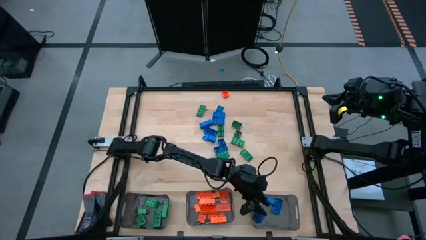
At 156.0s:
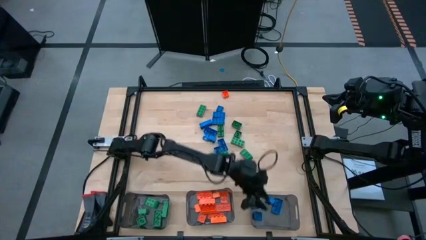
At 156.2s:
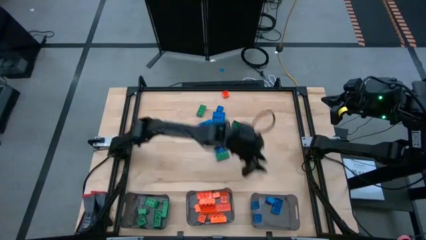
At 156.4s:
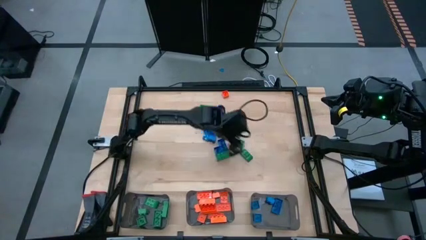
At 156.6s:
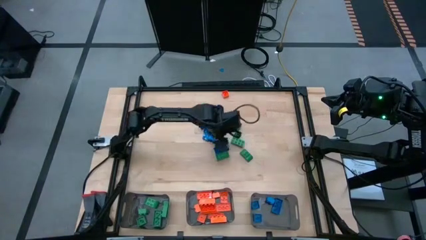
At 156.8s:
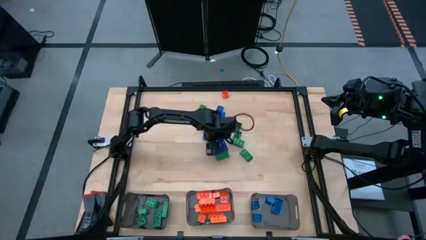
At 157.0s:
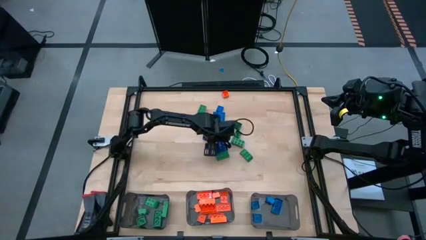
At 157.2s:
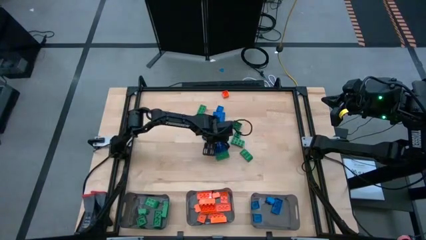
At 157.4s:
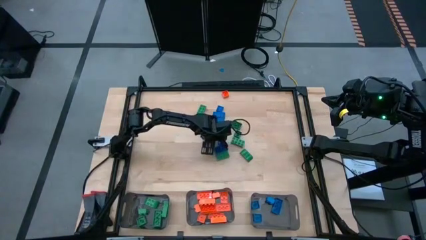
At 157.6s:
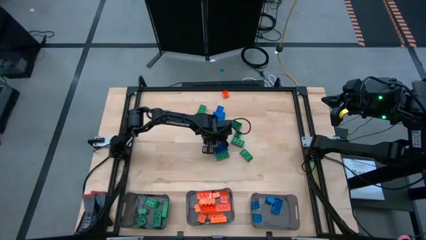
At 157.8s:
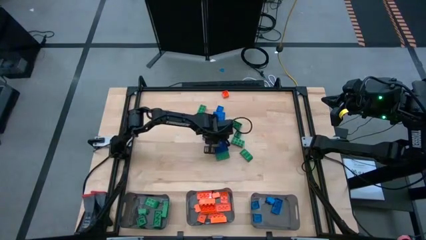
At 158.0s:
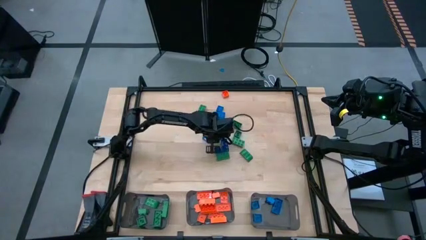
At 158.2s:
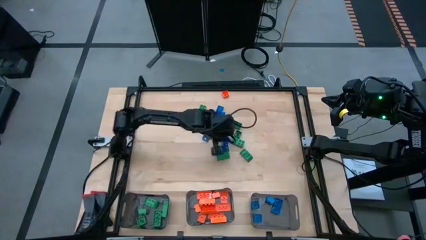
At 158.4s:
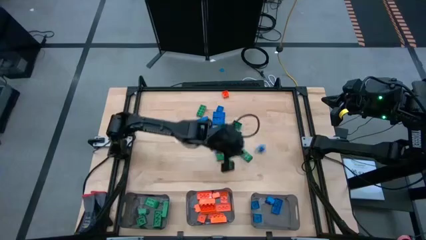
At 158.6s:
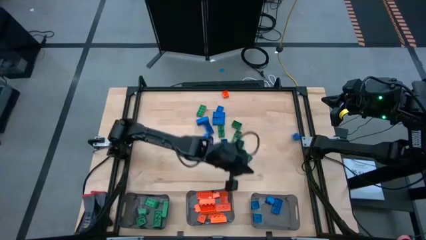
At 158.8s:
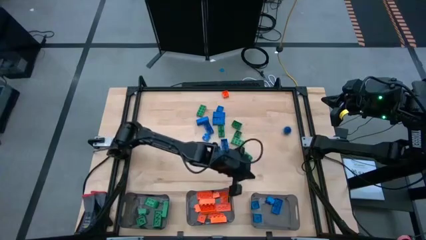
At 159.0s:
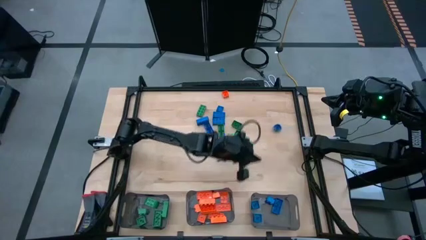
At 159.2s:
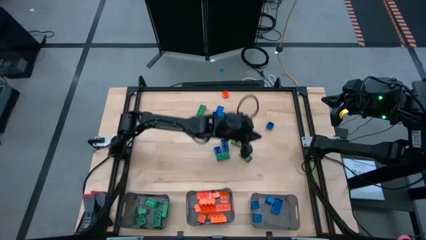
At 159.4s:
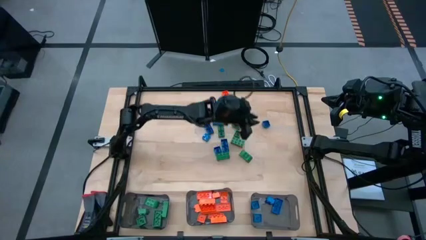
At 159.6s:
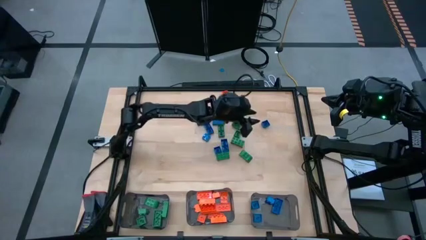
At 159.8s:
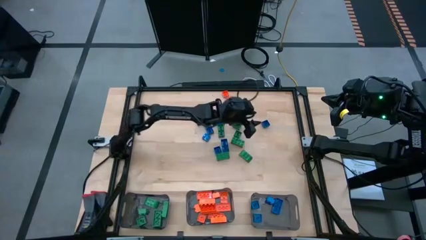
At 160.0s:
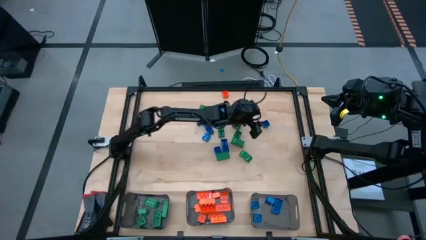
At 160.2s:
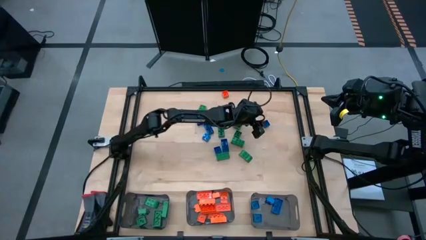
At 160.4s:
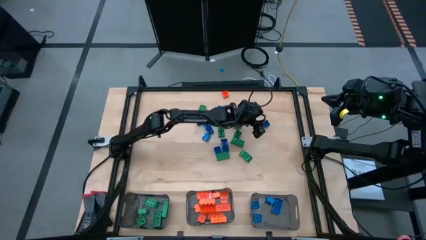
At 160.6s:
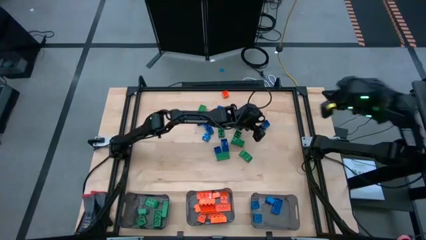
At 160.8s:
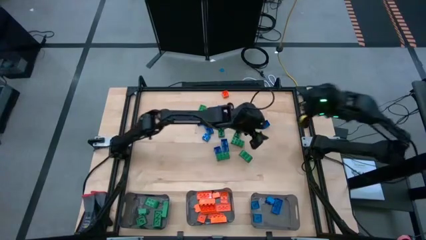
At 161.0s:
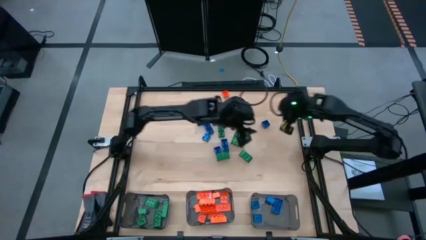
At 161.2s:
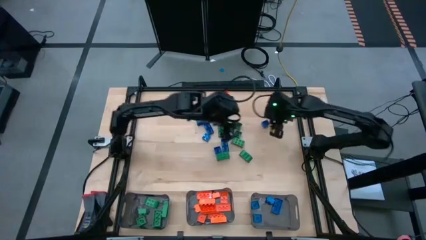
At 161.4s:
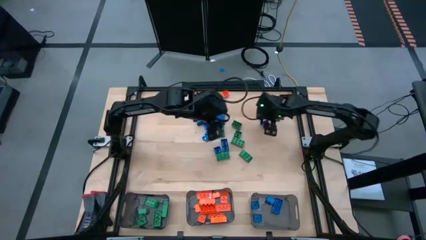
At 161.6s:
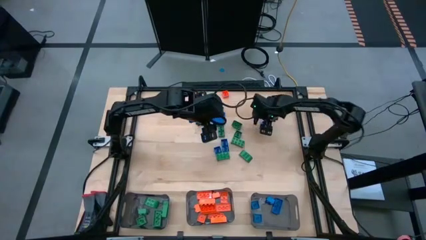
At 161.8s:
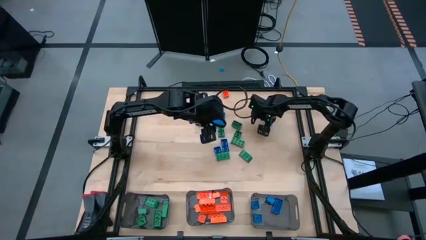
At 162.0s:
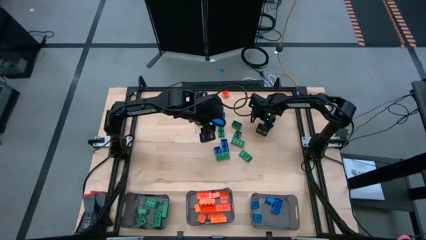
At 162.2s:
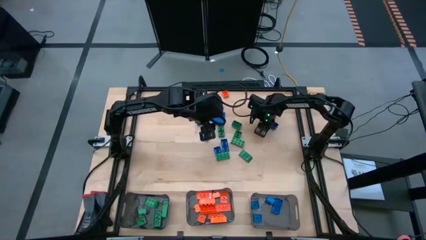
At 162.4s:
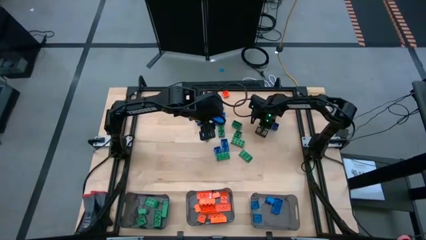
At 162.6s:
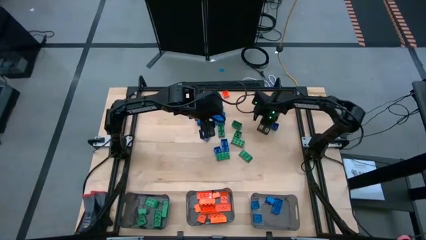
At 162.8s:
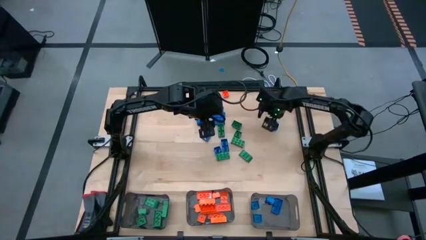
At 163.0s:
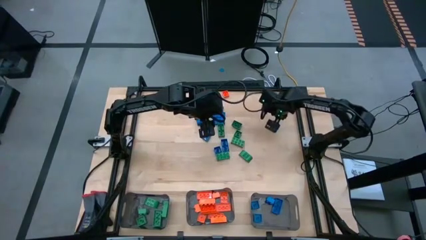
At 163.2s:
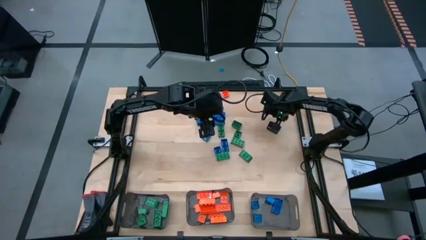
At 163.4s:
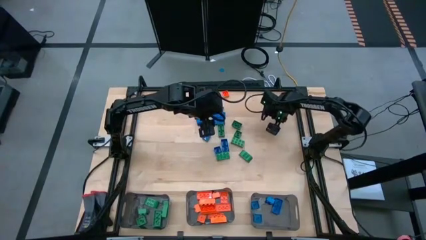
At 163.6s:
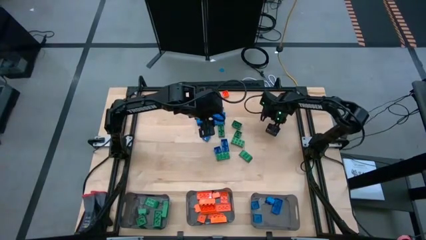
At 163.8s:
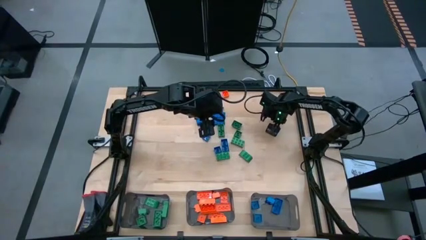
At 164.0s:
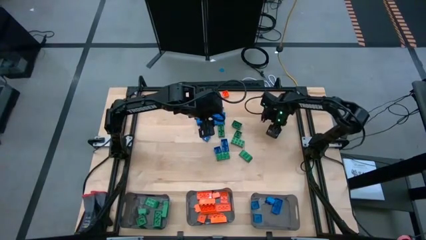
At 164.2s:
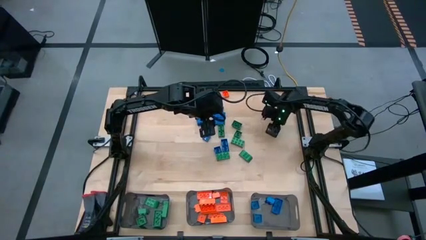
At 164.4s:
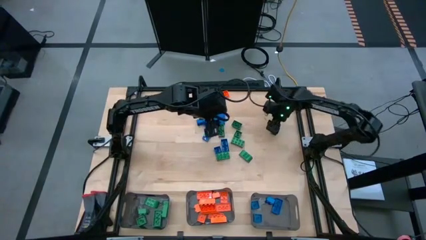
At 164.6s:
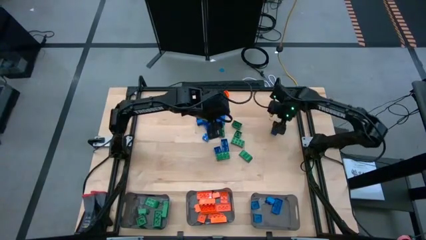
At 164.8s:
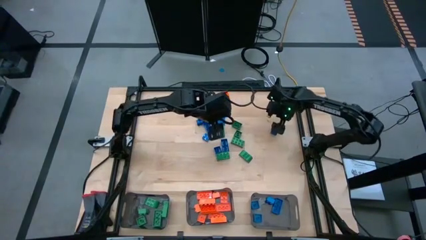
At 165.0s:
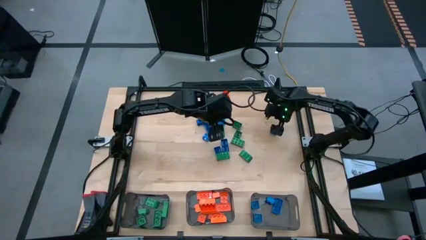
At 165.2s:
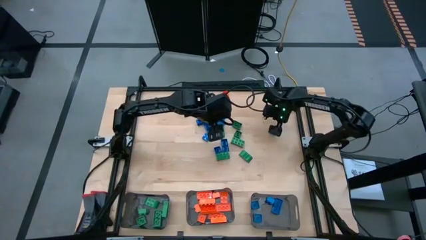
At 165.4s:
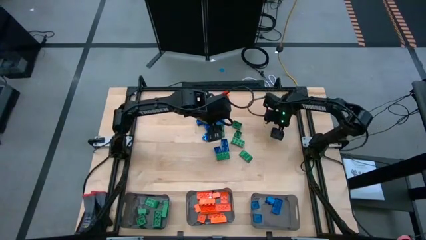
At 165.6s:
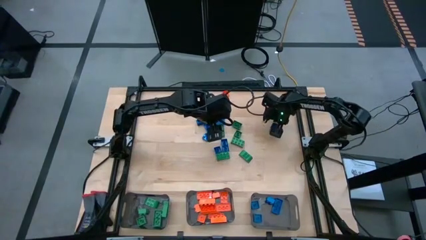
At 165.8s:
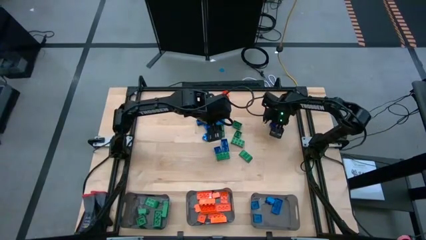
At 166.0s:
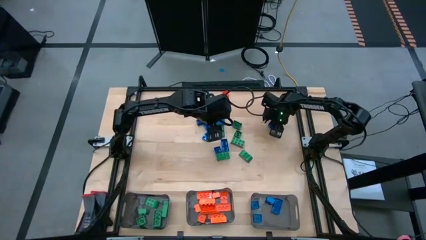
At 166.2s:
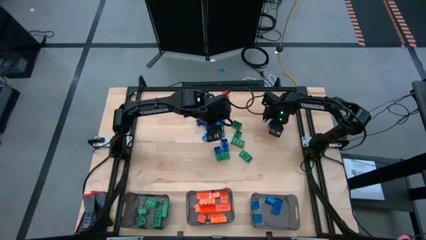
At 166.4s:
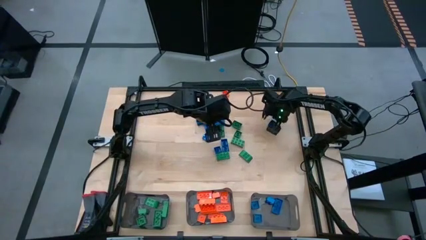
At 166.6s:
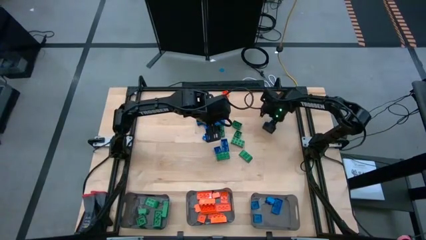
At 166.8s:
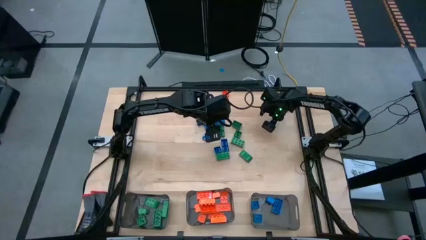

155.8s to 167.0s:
Task: Sort blocks
Put the blue game piece into the right black bin

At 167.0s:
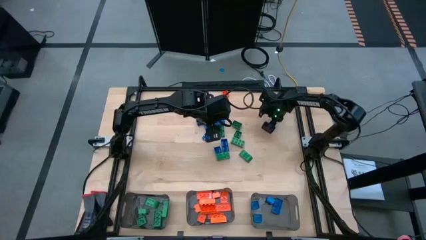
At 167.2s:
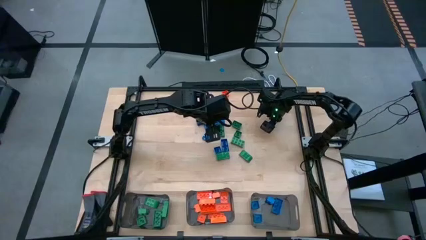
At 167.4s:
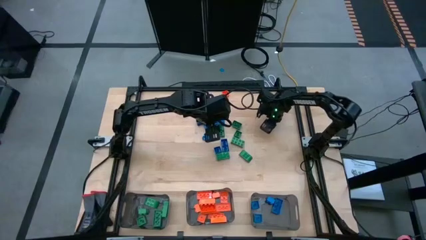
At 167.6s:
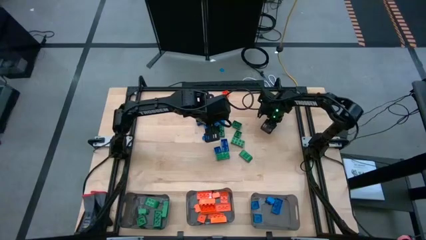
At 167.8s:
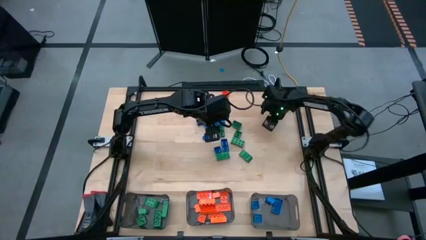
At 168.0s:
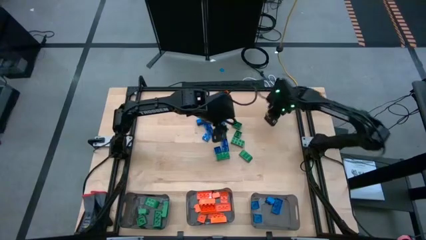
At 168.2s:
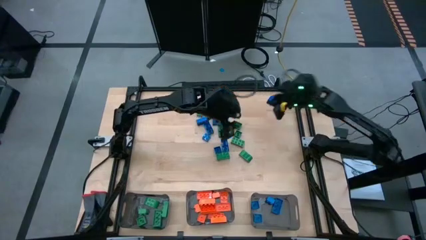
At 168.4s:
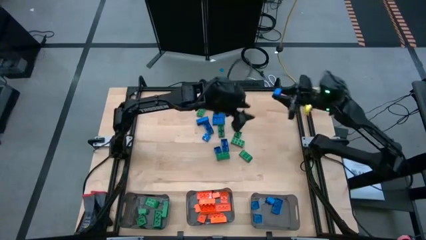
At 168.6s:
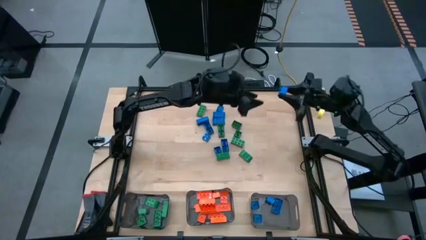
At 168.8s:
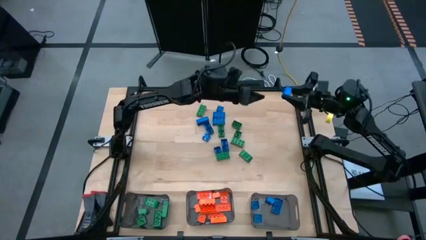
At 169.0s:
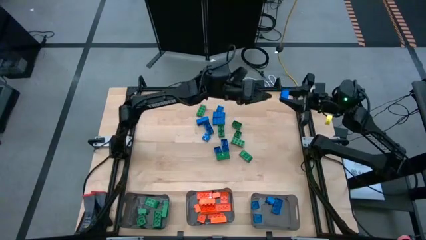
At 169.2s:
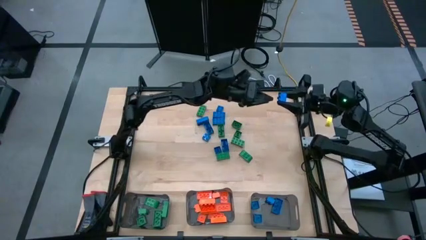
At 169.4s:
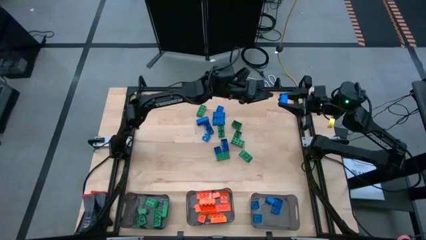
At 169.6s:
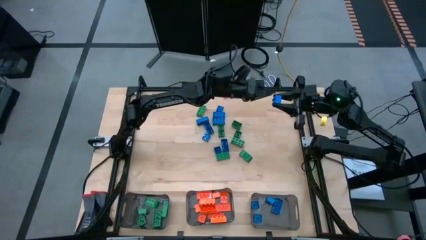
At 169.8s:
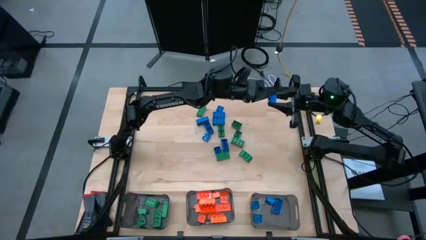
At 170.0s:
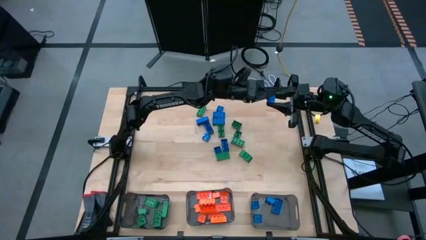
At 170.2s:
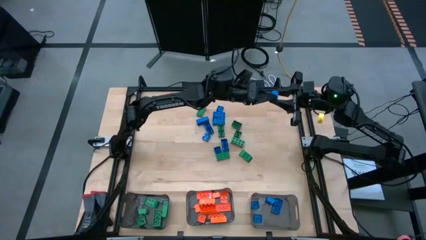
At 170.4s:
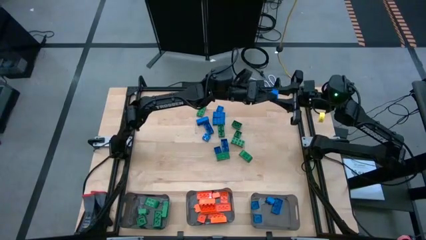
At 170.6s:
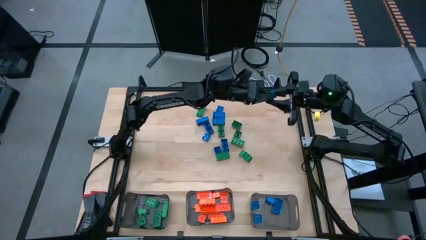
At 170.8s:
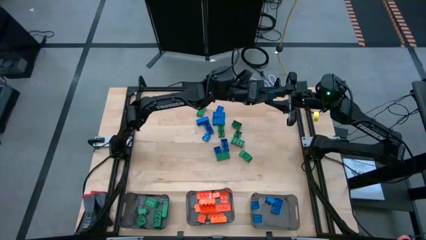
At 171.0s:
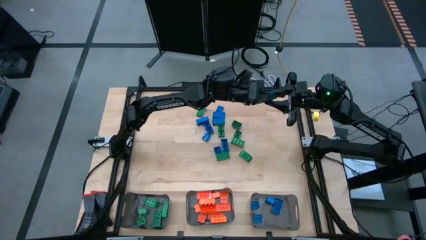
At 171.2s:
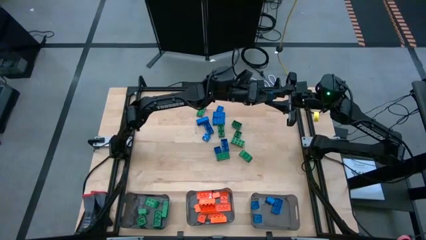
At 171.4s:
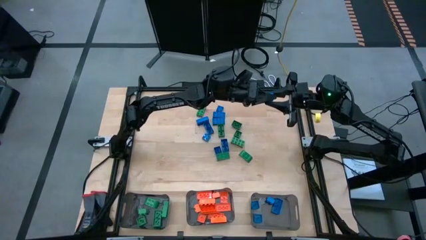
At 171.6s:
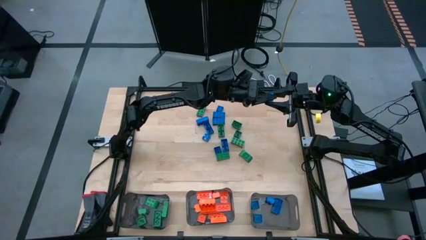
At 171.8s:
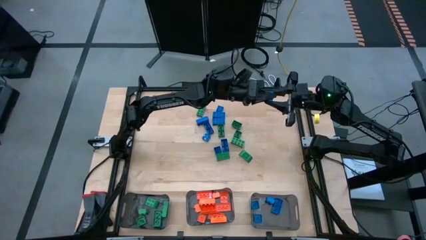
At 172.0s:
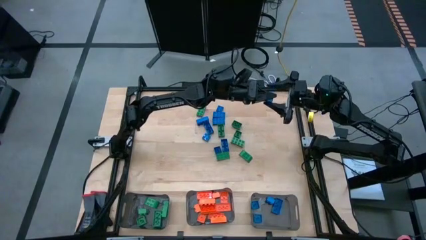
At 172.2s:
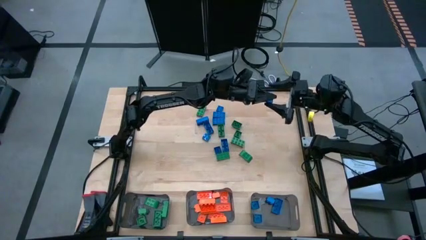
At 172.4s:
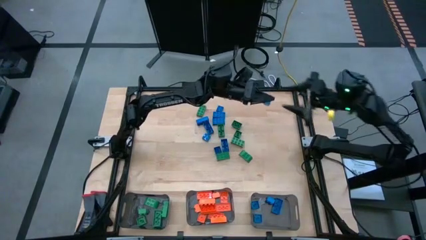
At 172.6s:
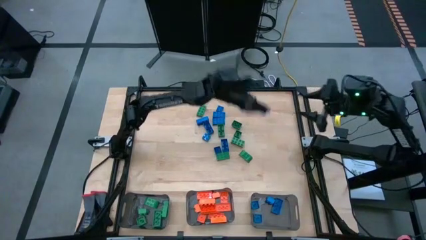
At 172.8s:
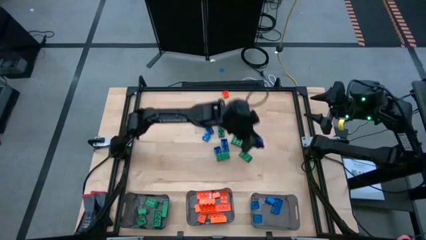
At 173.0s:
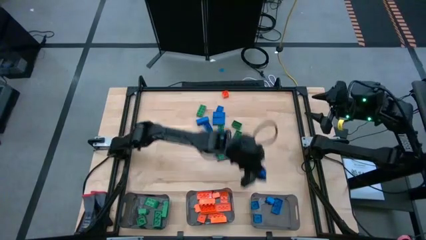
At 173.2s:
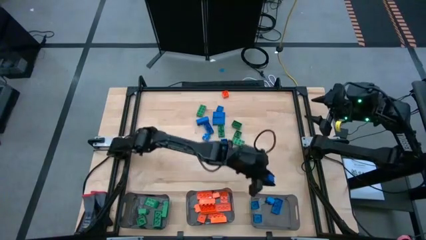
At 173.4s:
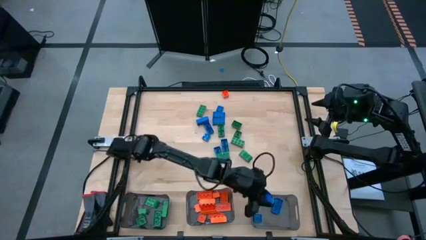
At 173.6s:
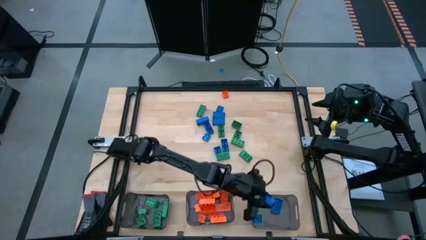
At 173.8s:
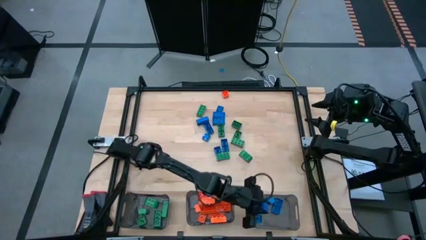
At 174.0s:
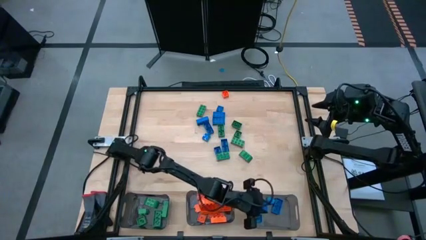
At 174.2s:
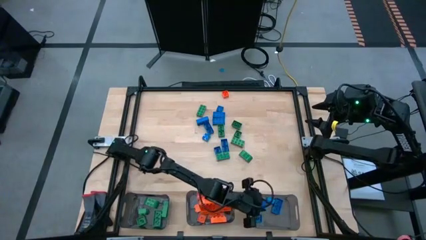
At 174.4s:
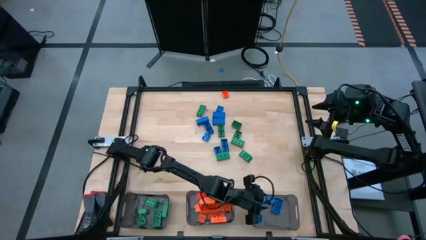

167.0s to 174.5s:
Put the blue game piece into the right black bin
